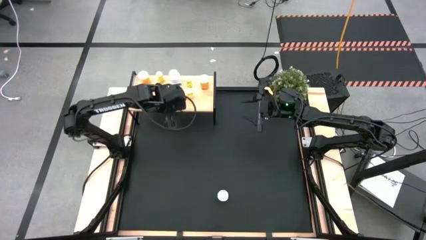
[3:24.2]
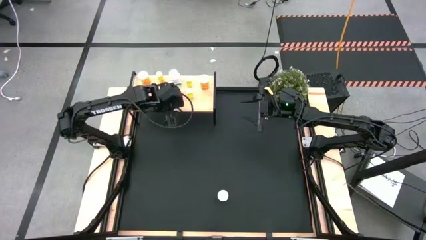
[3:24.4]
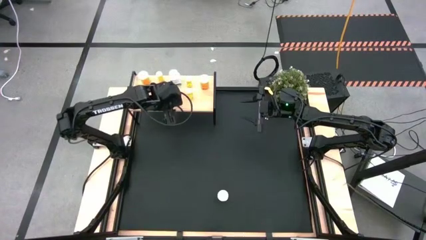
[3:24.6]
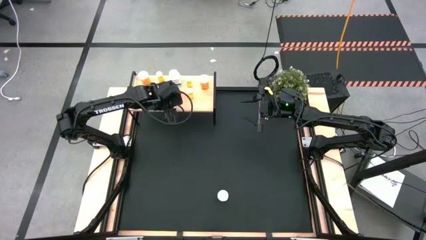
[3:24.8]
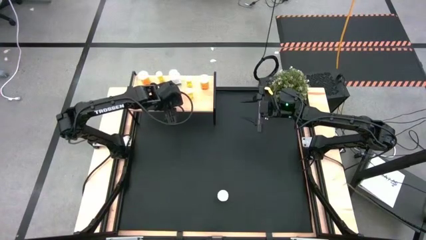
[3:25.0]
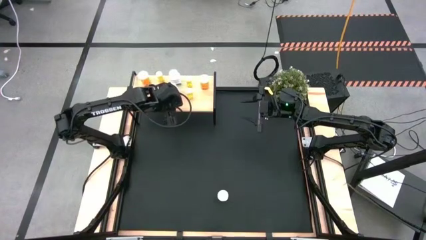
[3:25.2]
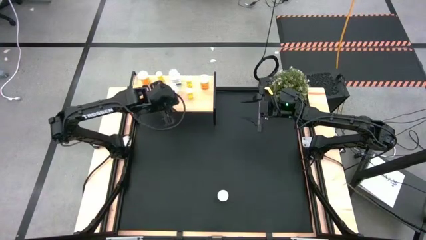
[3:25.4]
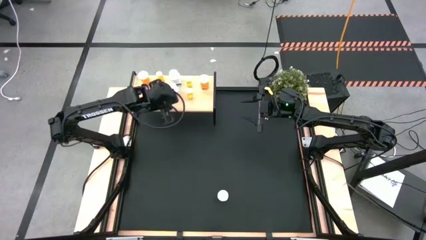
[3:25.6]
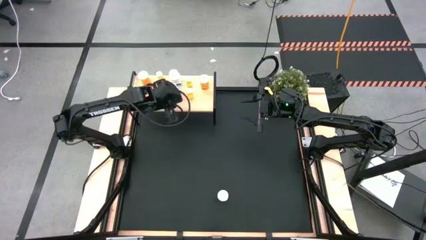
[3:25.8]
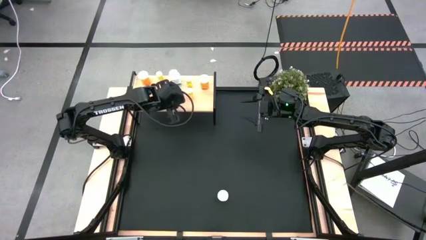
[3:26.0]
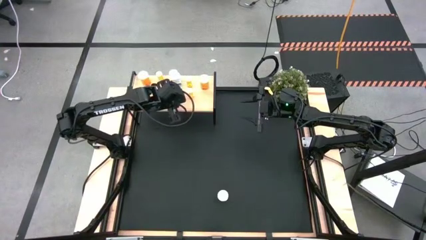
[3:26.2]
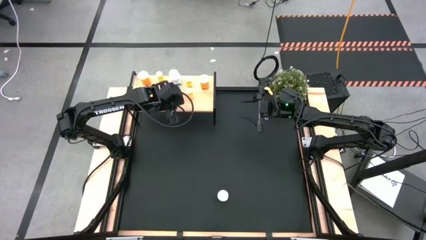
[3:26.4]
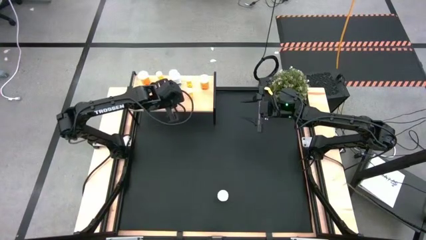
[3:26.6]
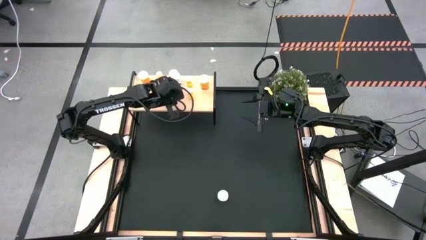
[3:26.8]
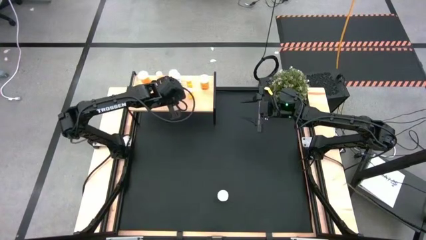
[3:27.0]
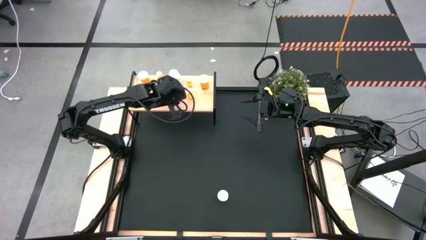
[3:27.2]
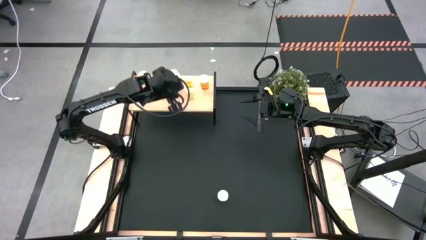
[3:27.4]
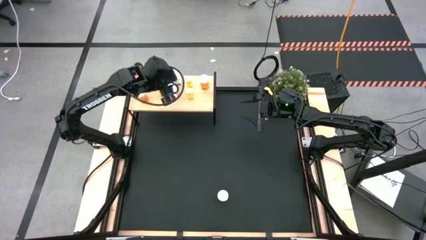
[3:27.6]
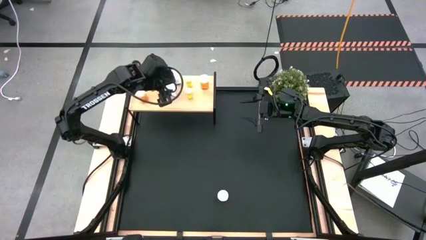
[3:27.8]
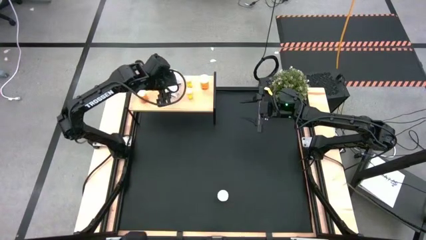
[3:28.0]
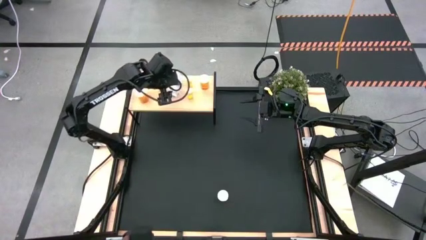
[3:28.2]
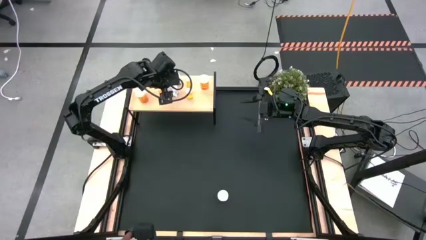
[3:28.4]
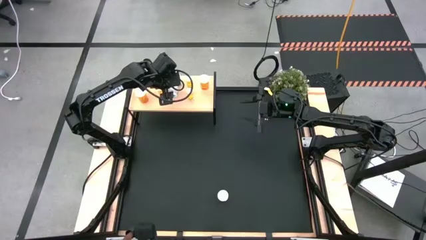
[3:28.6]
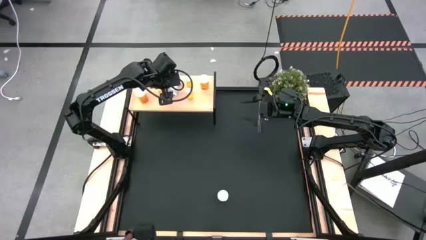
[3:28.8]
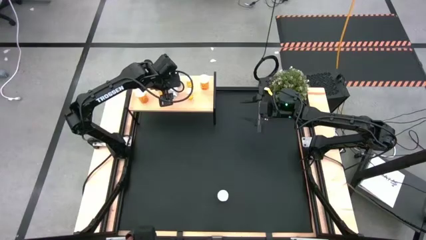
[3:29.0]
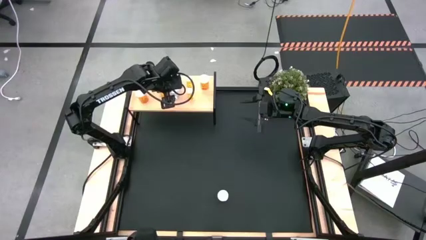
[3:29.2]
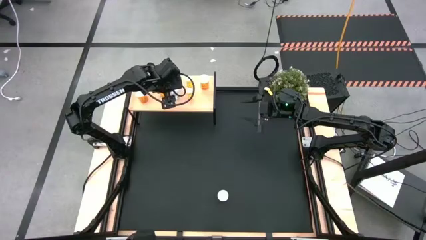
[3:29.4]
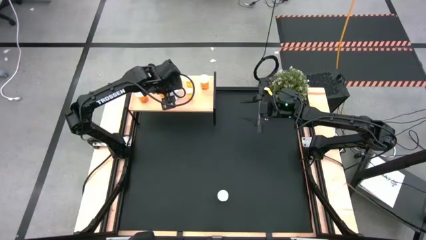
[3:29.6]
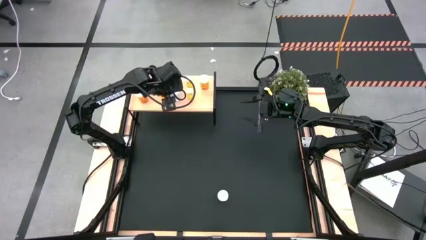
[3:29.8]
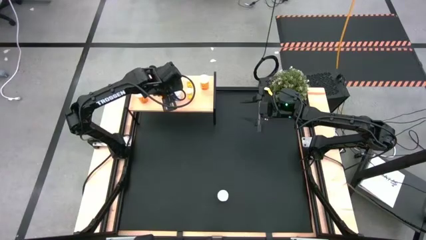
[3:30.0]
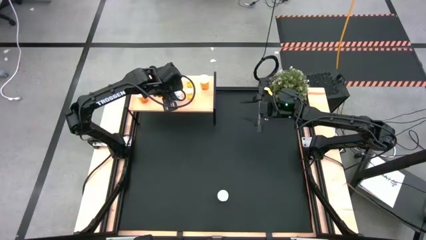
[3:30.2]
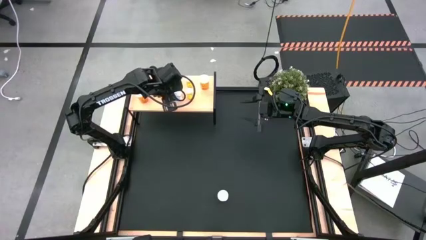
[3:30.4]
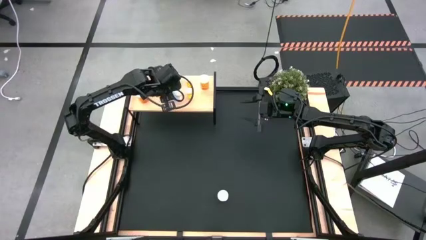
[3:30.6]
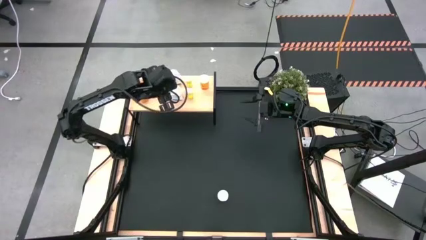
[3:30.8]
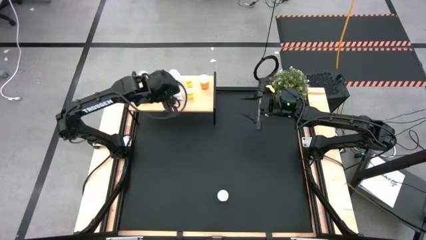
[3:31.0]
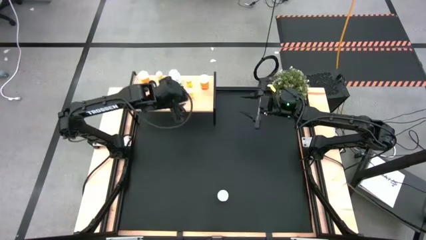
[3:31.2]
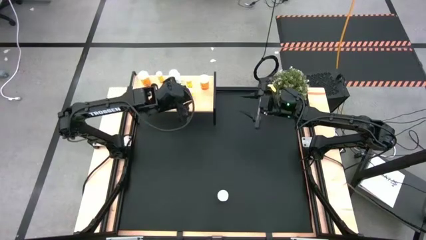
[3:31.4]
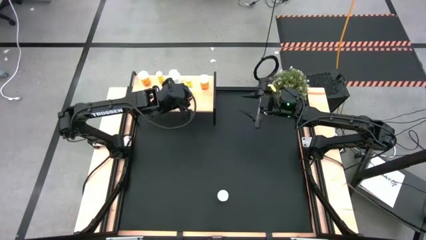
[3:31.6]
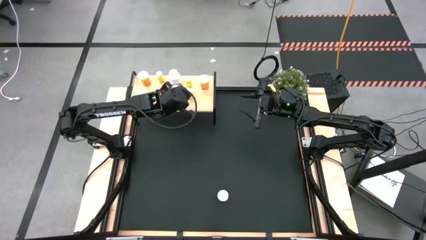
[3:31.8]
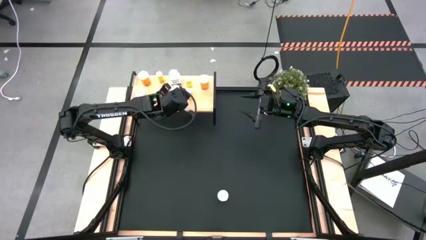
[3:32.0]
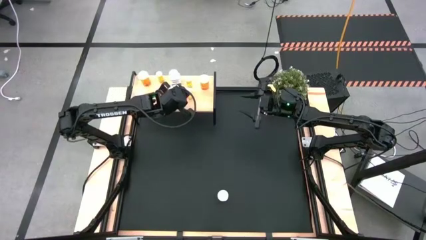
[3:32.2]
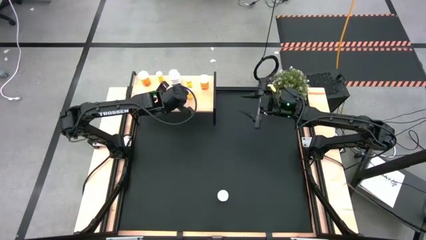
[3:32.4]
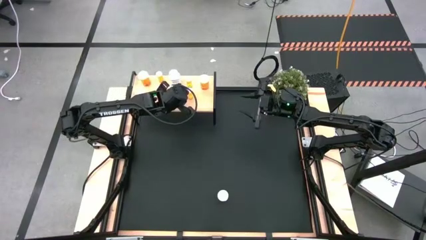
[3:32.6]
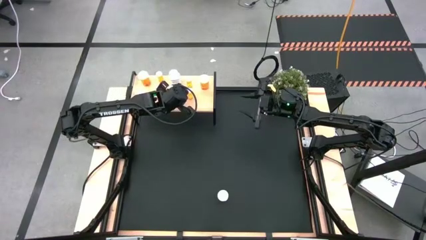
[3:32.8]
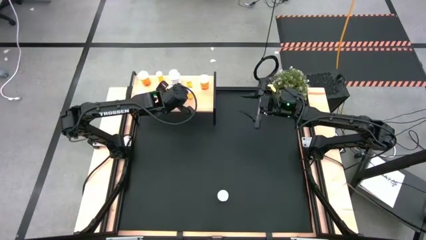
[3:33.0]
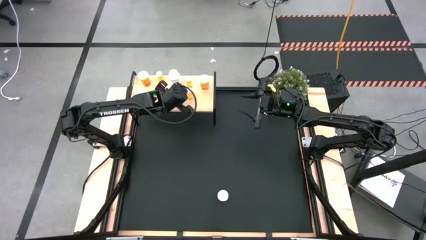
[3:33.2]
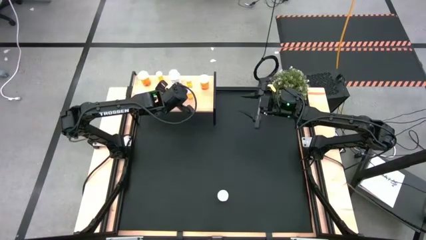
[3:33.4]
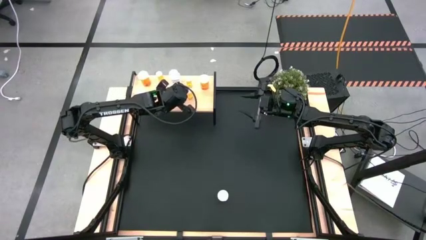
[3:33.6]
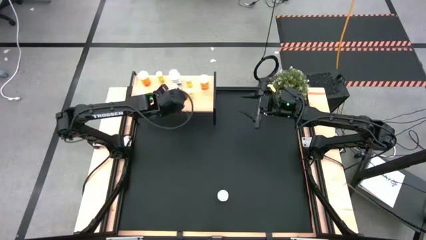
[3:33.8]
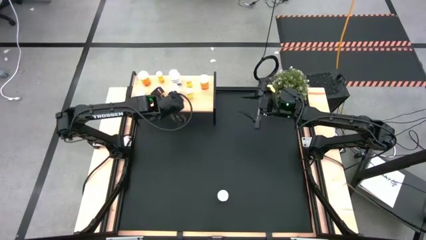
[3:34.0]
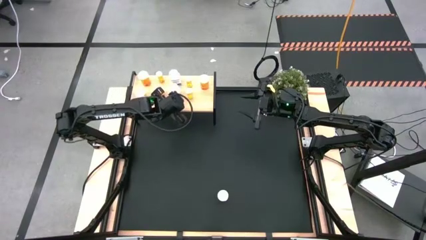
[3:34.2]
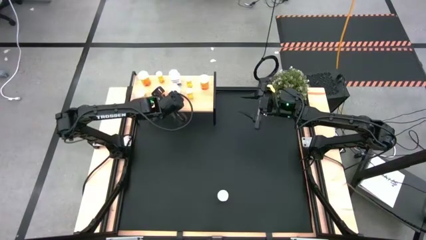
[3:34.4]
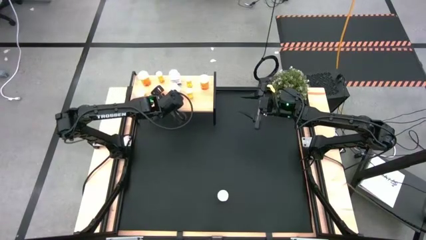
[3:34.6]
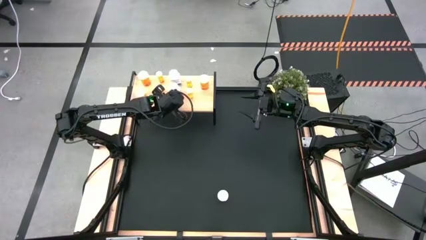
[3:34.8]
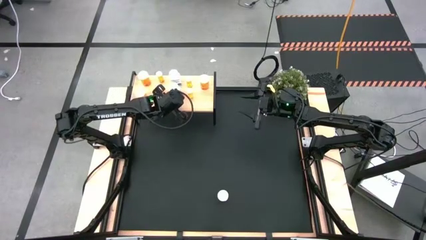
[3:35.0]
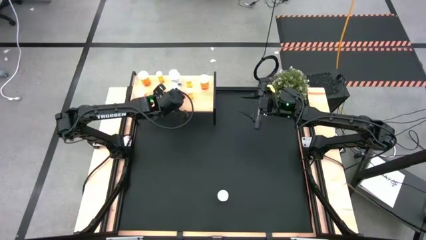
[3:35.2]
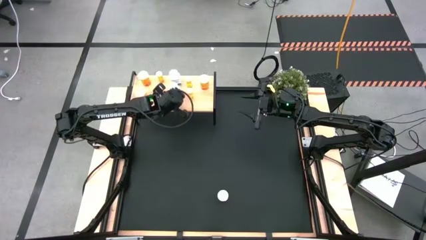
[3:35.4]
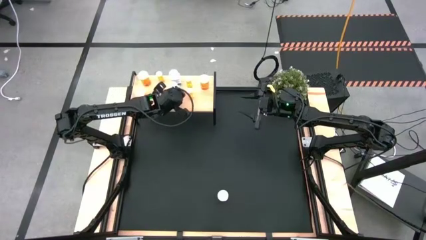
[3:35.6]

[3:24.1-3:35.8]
Task: Pick and place medicine bottles onto shelf by color
Adjust the pill bottles on the shelf
